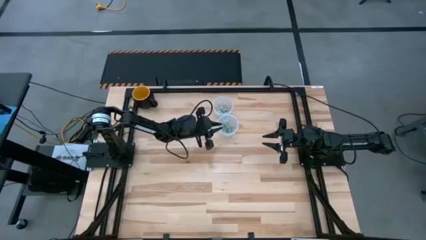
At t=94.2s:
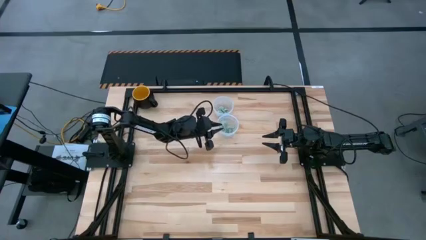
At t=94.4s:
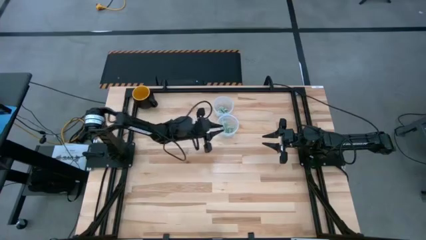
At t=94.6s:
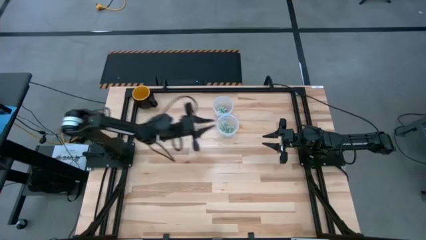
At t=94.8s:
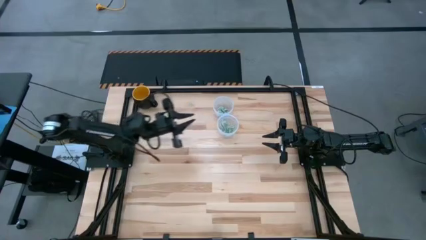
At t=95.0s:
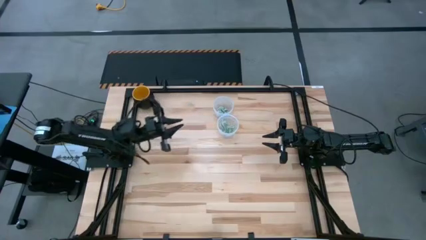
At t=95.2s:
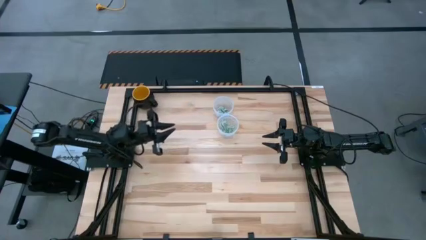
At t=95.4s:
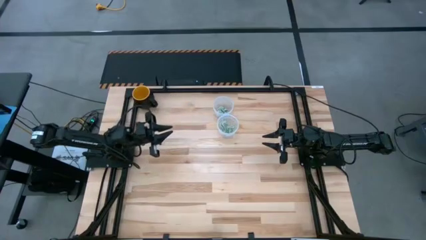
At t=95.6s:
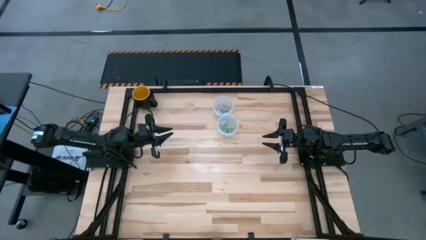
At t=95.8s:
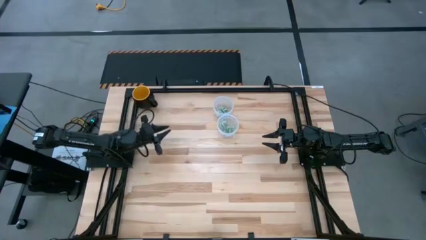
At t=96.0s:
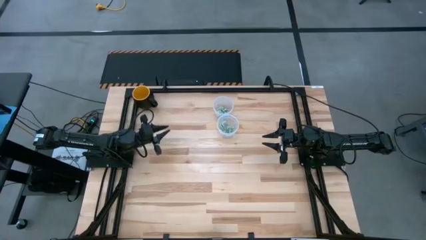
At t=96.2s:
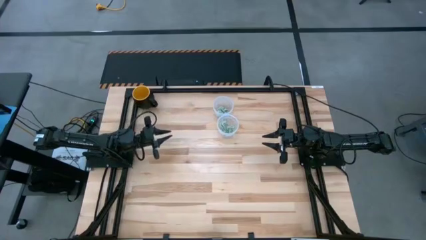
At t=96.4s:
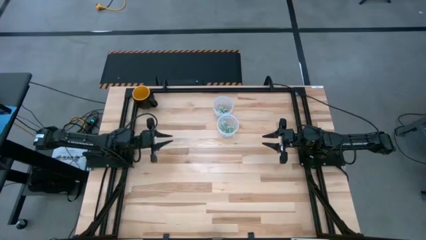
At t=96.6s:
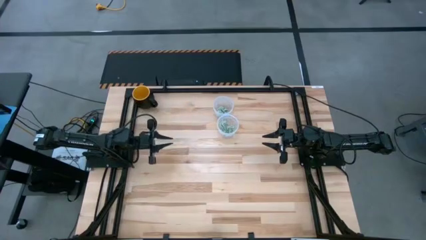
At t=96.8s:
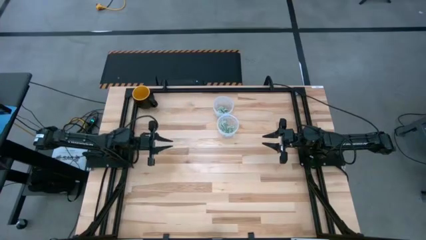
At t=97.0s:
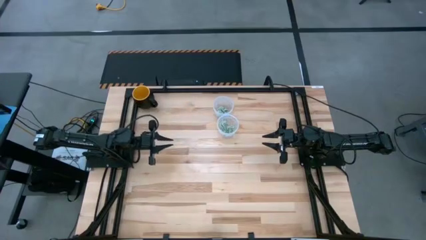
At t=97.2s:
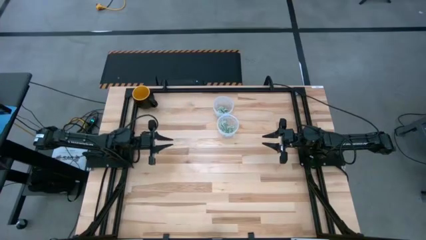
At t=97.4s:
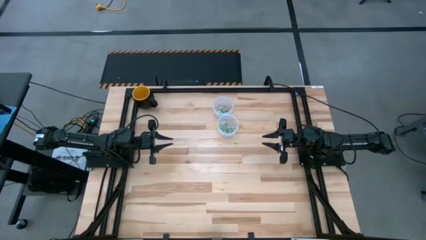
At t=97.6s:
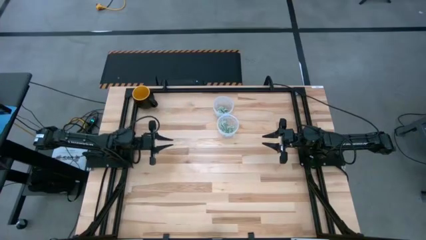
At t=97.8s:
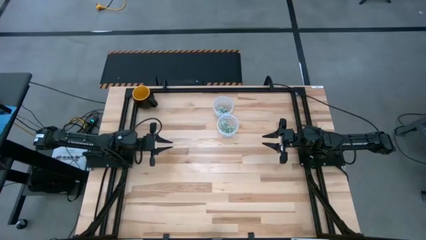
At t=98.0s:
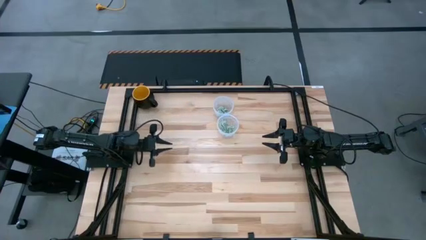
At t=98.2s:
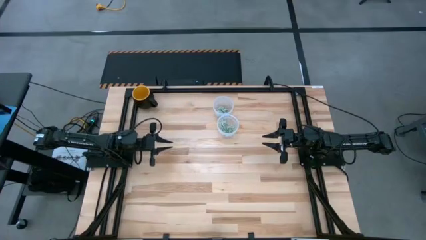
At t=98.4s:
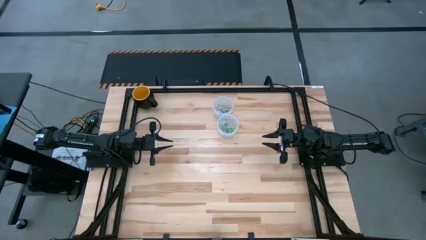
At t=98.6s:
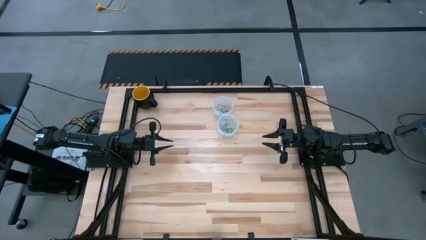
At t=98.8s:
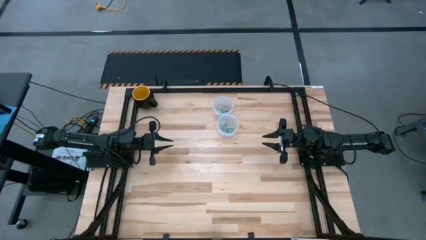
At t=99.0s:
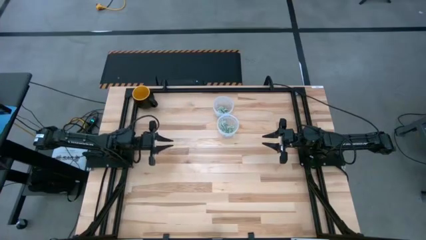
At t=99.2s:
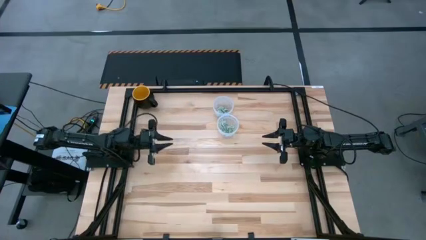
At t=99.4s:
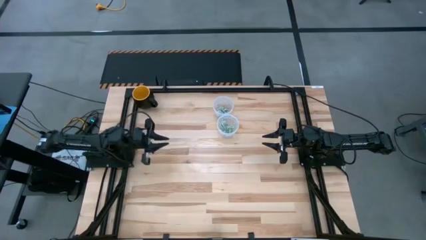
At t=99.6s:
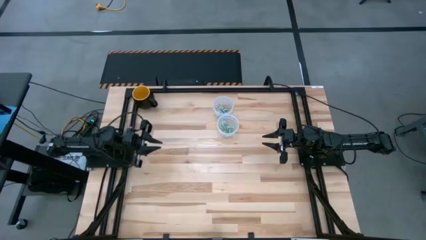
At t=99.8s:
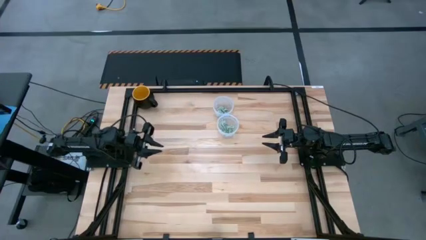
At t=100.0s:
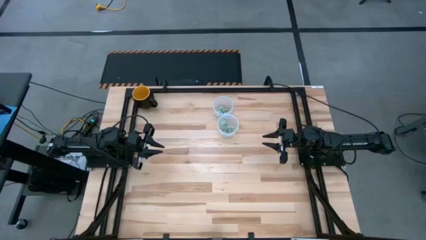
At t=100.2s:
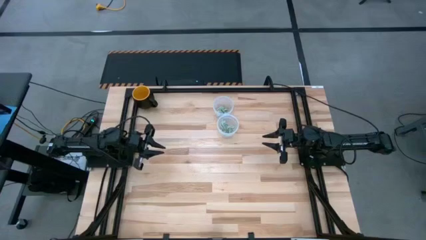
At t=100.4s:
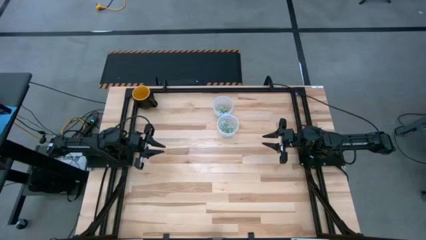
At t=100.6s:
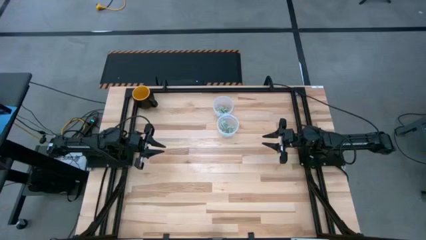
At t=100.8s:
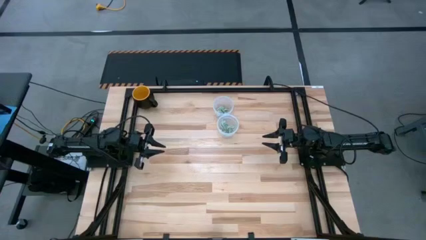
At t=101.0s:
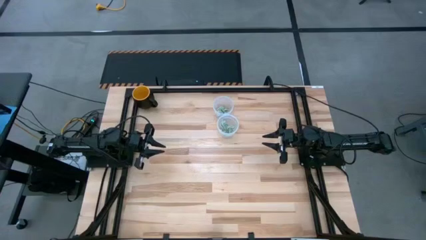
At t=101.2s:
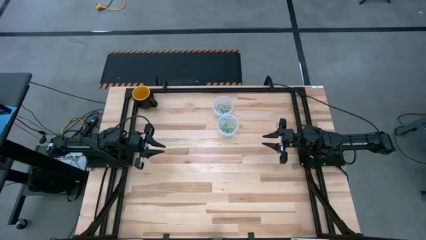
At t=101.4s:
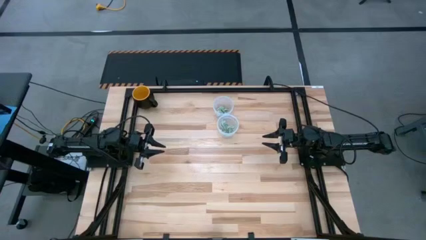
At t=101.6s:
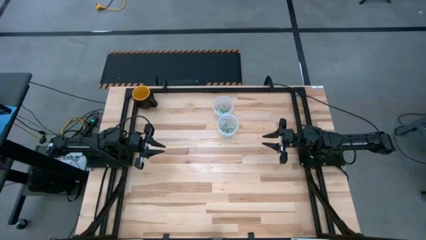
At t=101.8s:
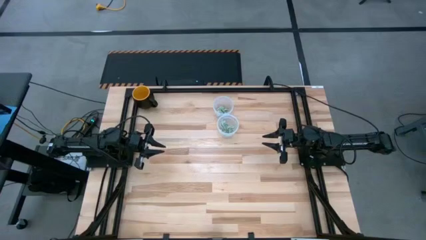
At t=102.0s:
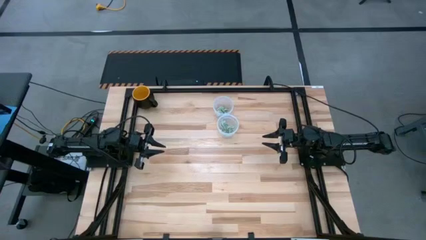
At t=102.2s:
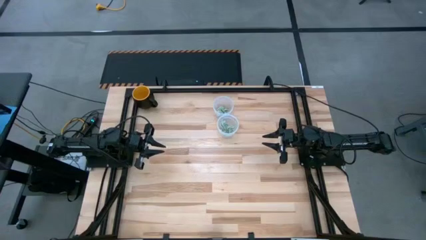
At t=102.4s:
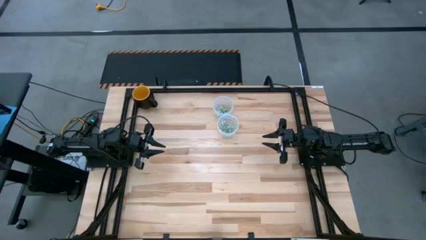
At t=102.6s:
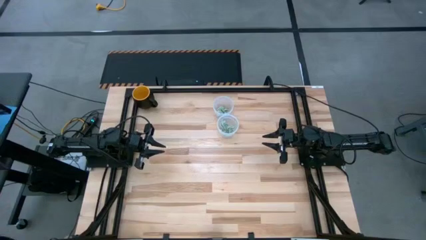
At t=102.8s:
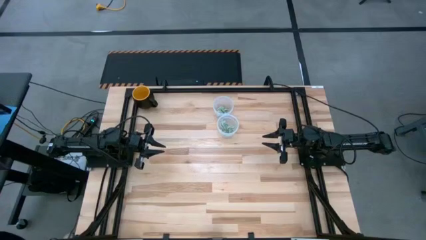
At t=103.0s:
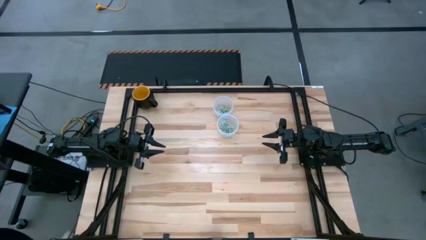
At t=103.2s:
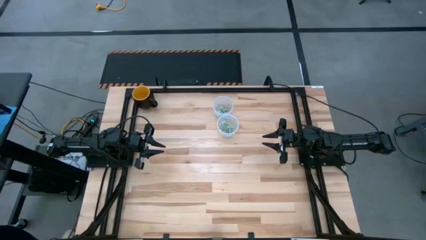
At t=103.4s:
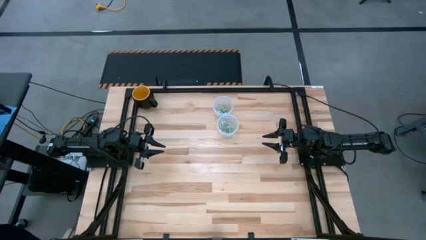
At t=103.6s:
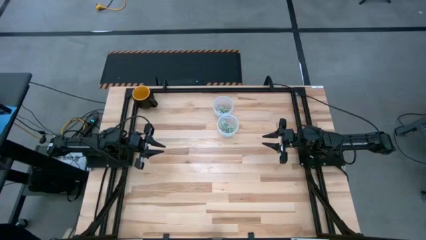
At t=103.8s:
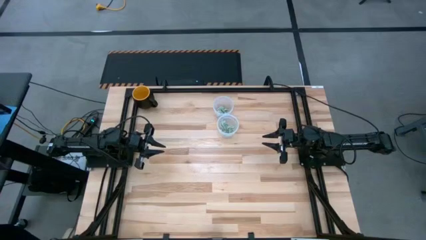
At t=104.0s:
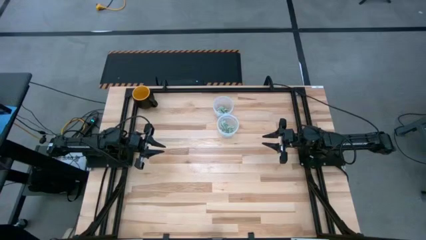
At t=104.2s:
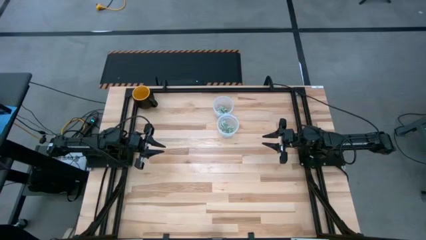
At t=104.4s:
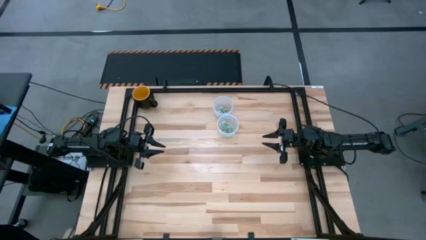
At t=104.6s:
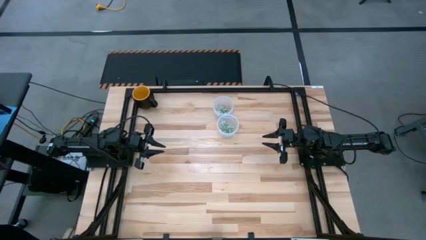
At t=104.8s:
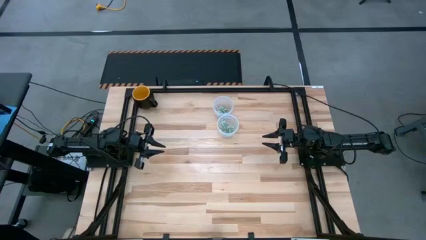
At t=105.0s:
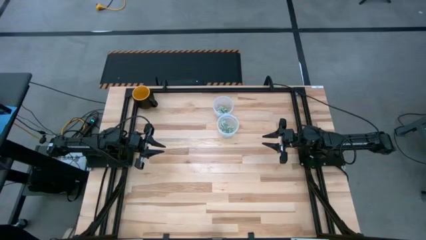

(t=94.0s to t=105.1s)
Task: Pick and place items into bin
Return to Home Position
